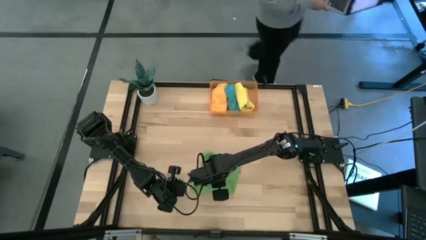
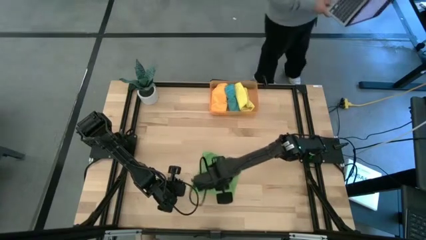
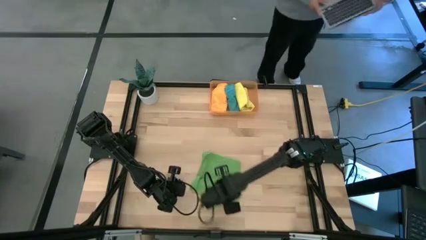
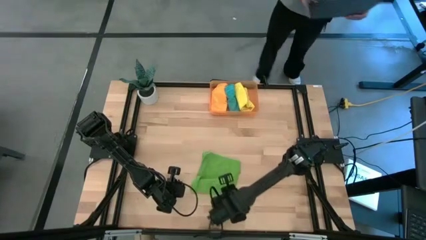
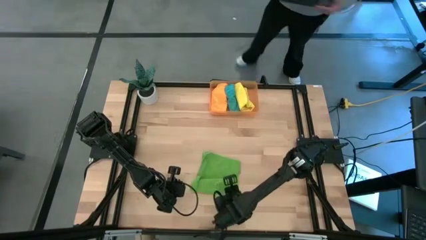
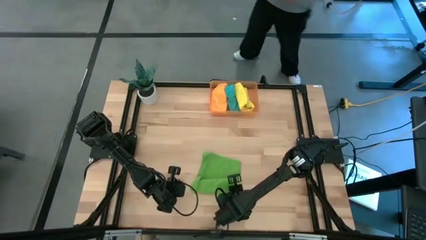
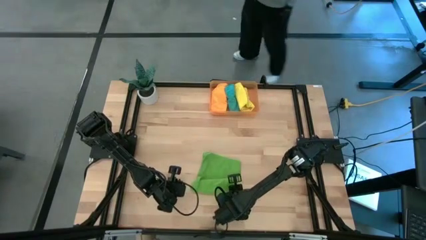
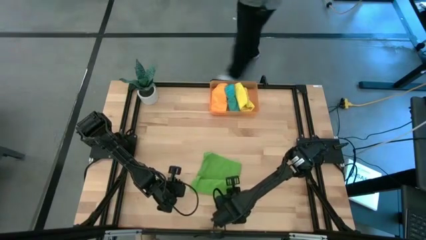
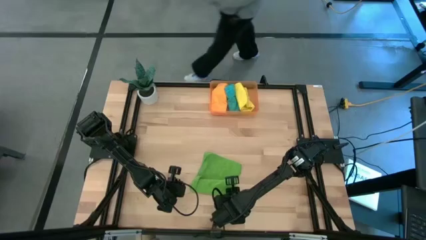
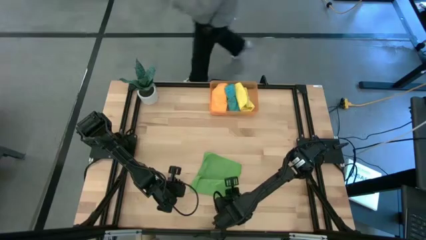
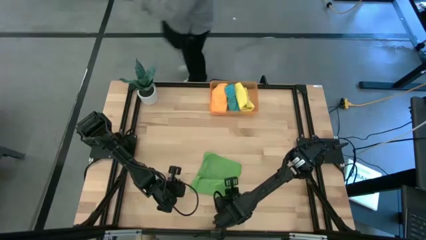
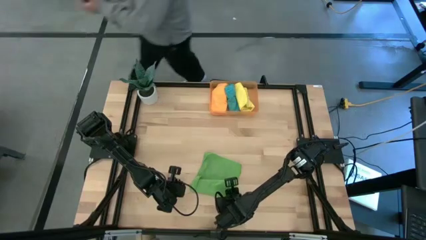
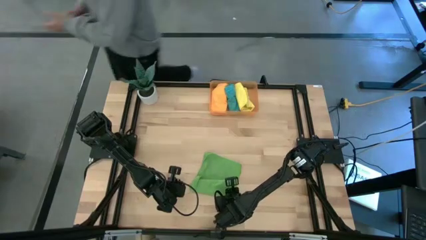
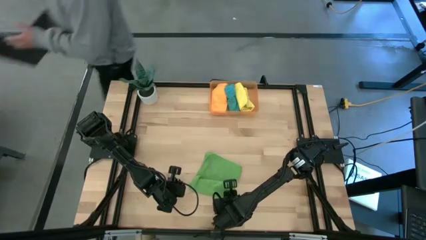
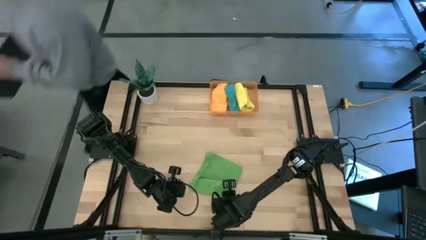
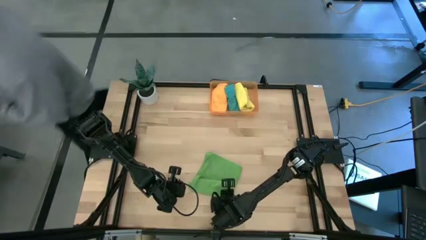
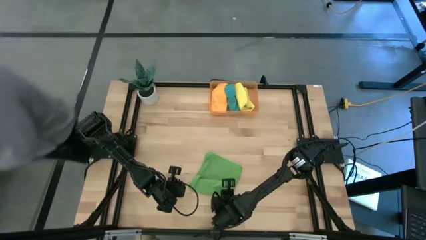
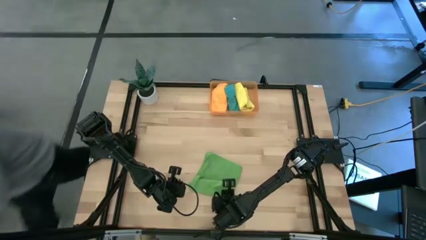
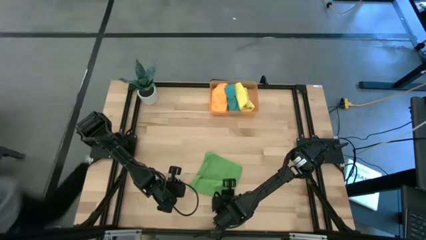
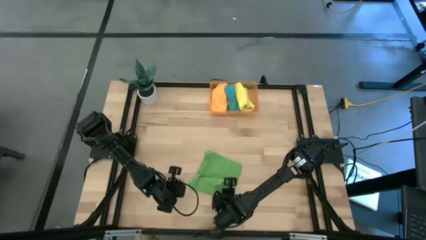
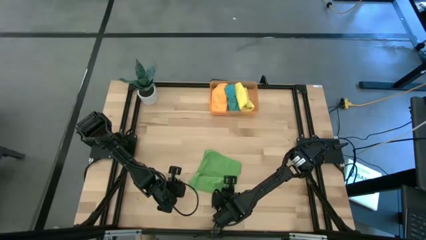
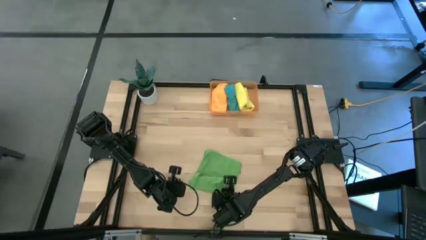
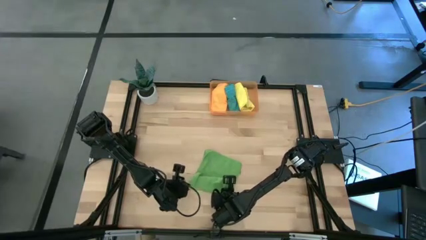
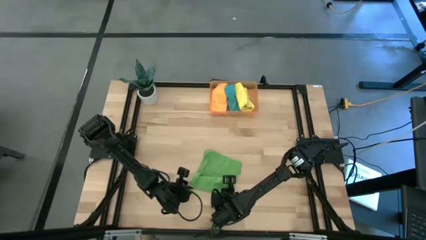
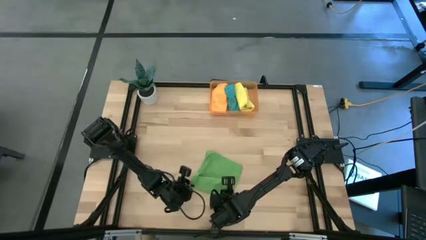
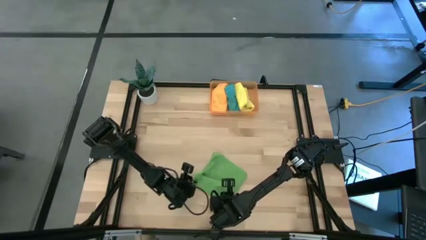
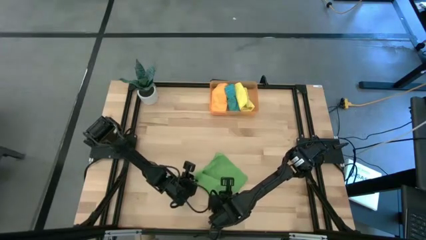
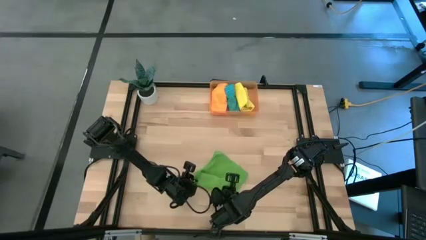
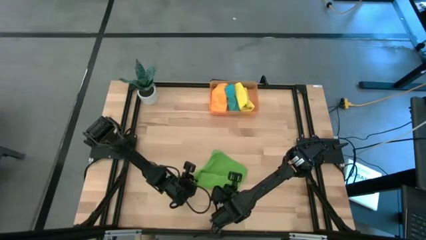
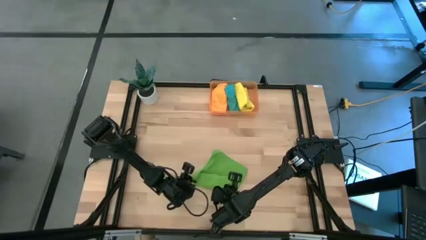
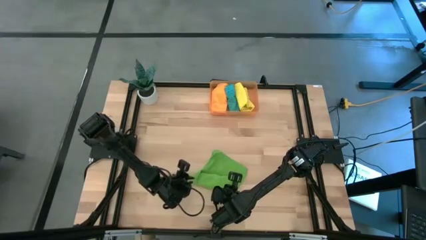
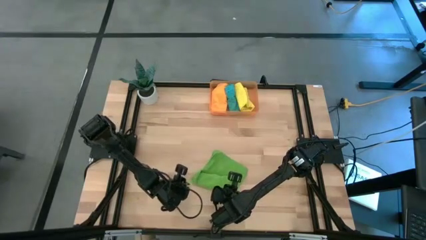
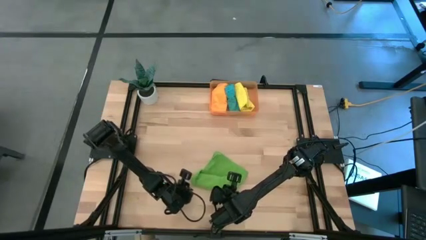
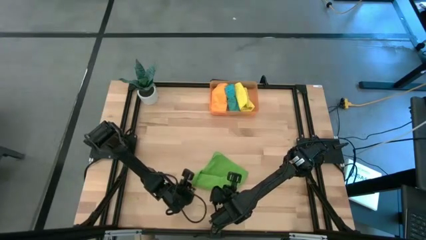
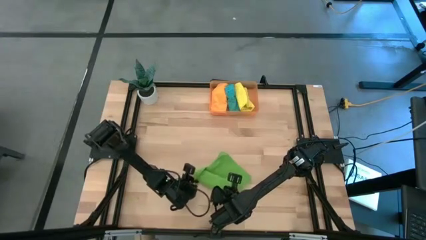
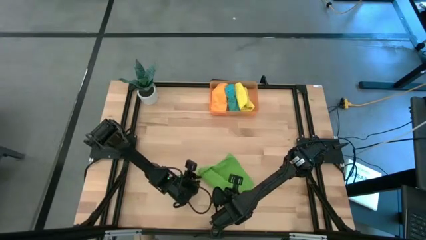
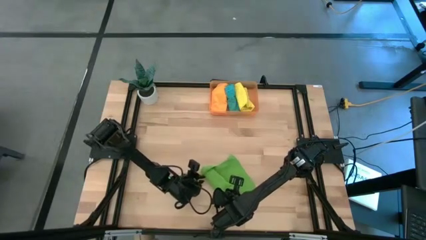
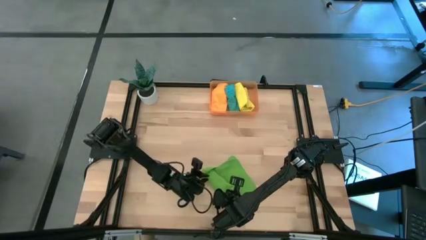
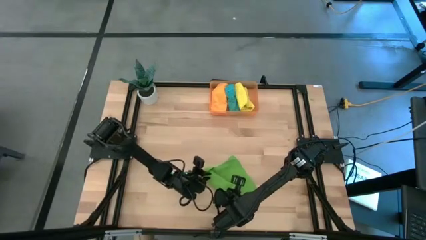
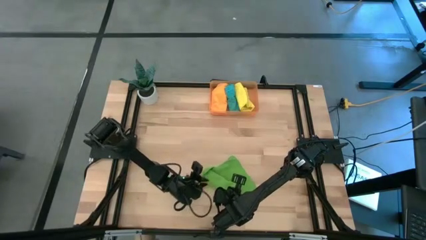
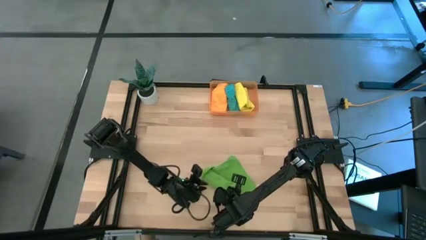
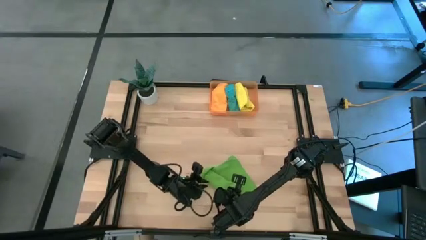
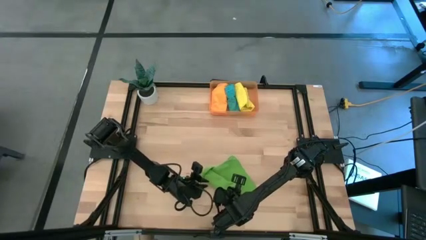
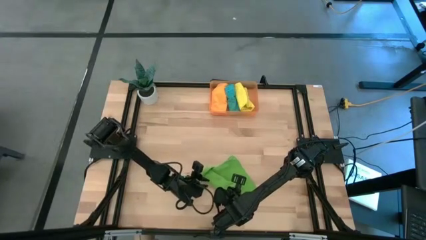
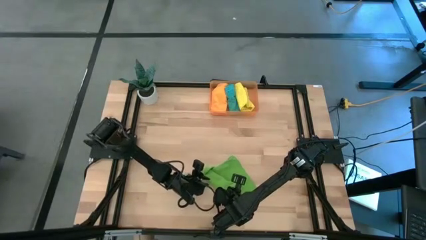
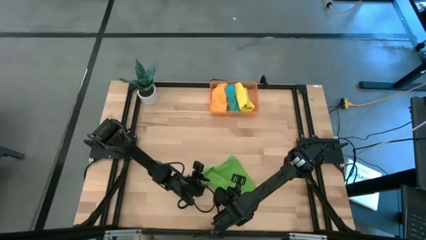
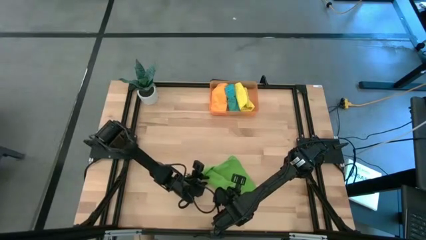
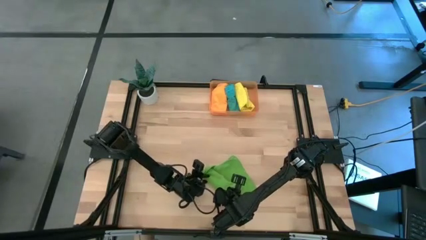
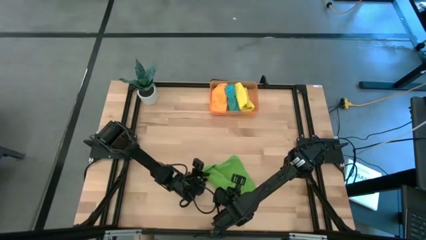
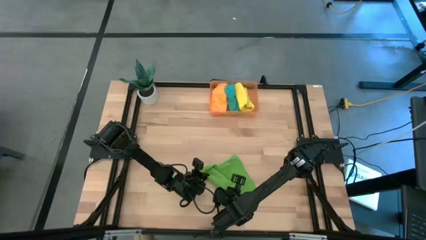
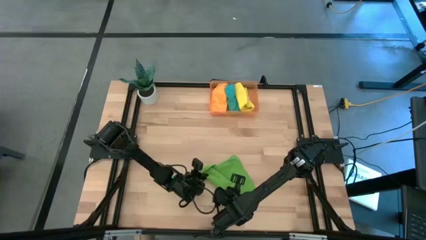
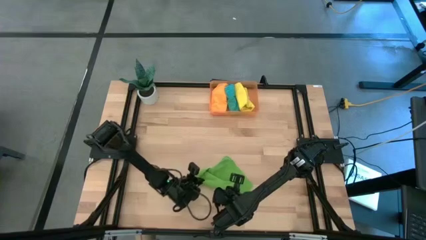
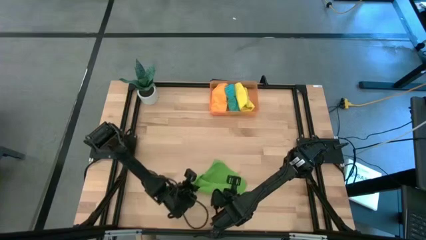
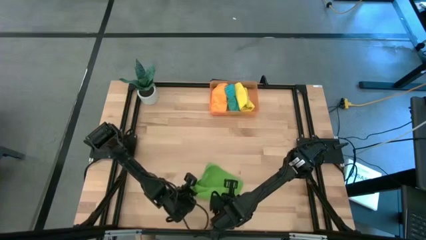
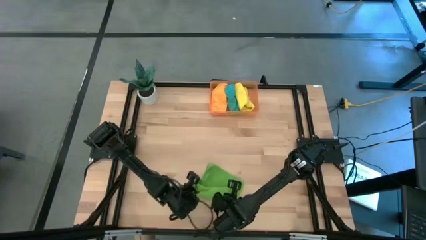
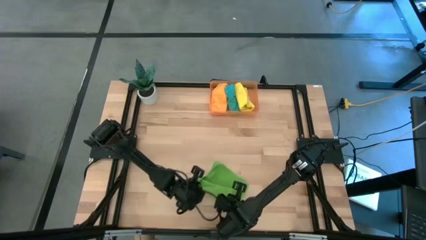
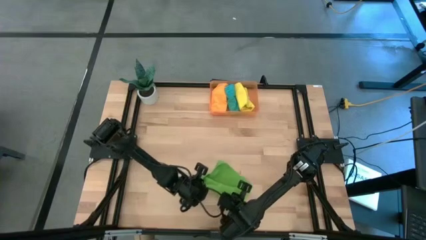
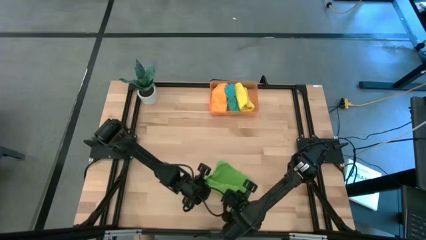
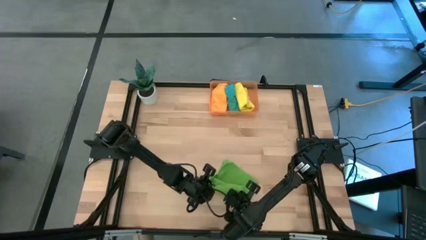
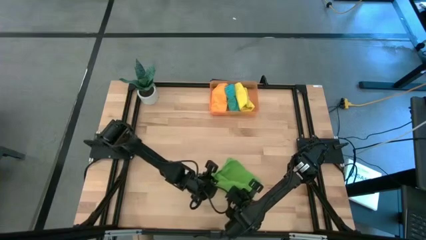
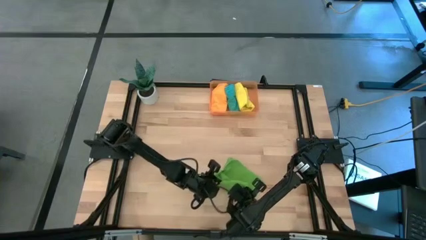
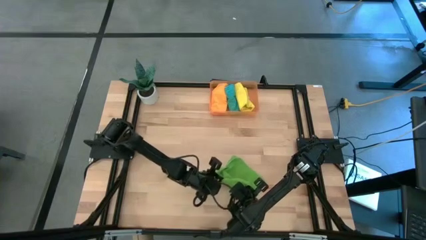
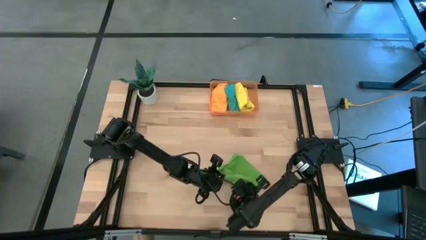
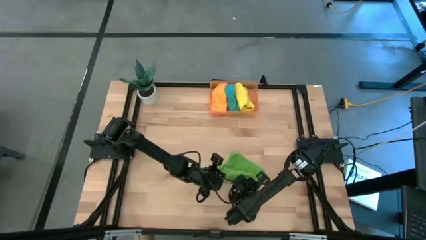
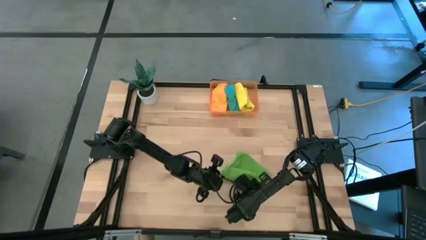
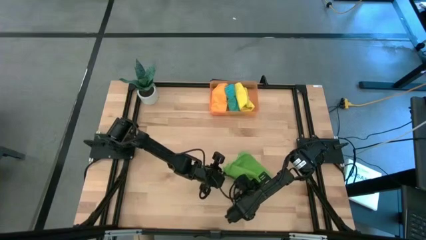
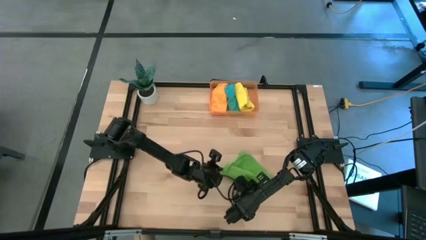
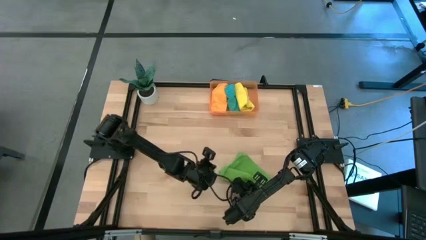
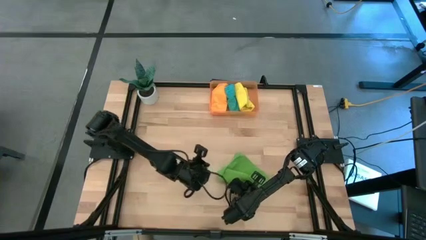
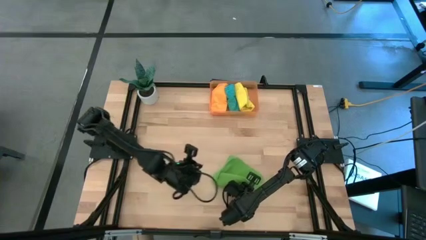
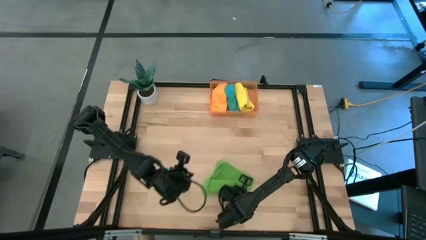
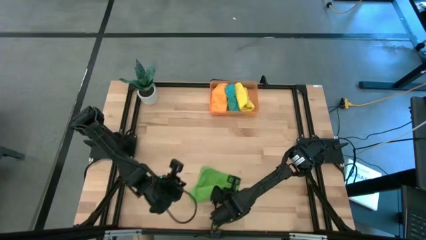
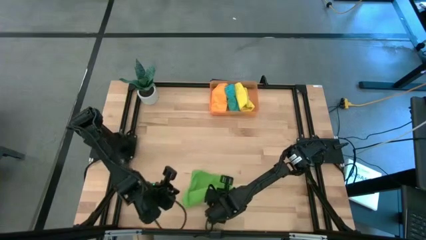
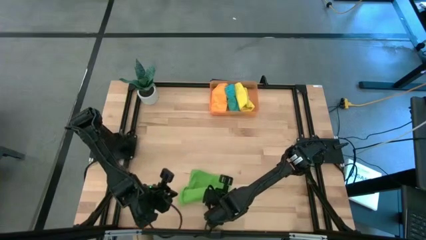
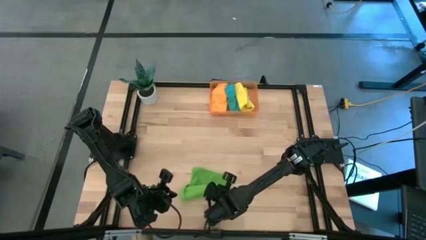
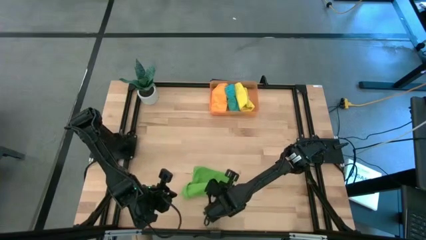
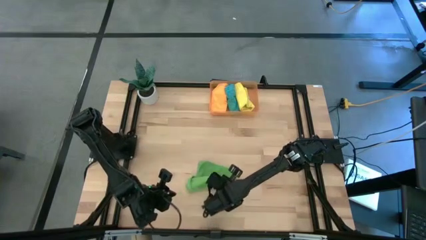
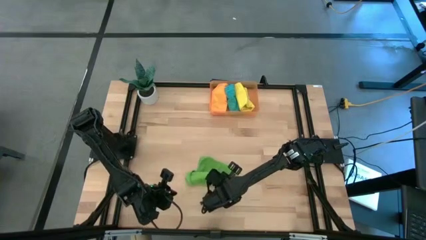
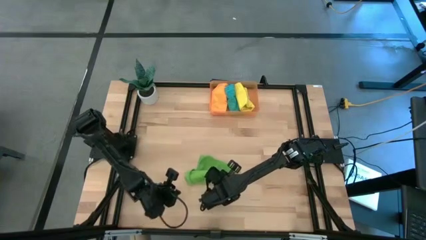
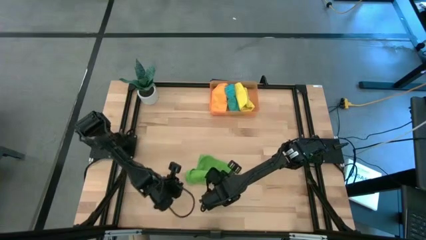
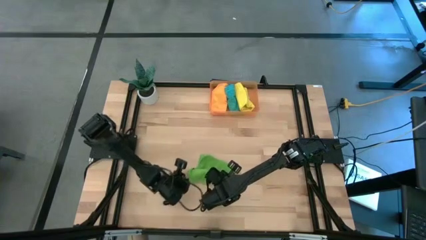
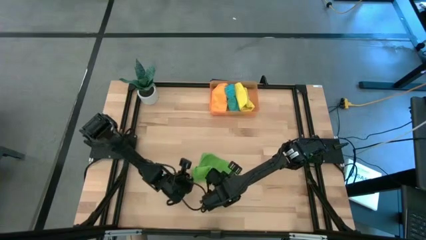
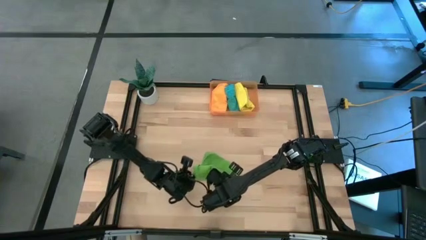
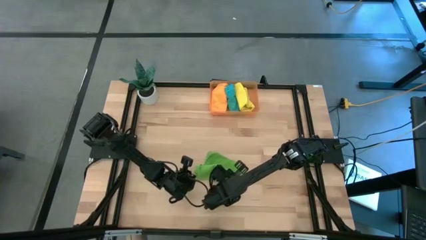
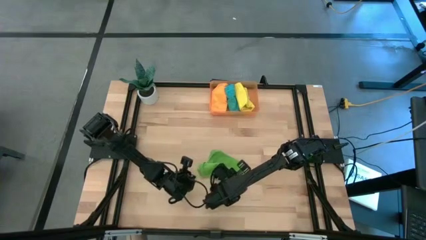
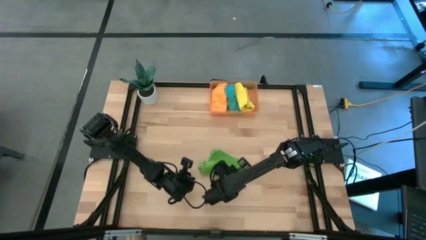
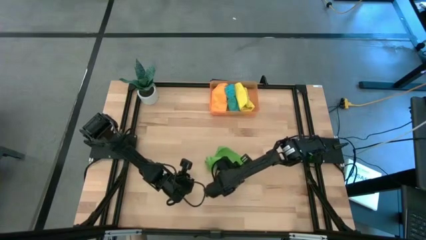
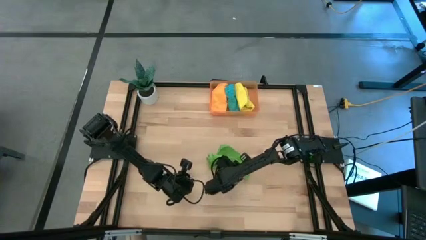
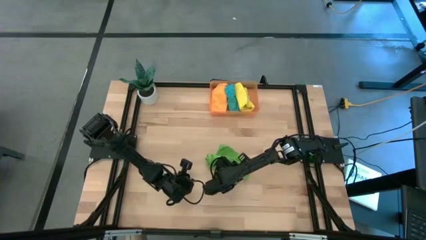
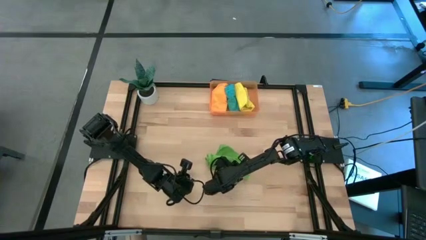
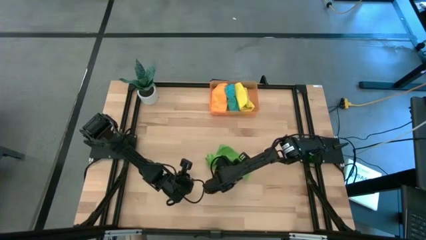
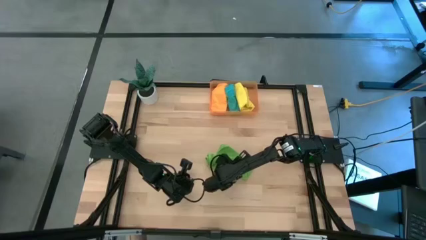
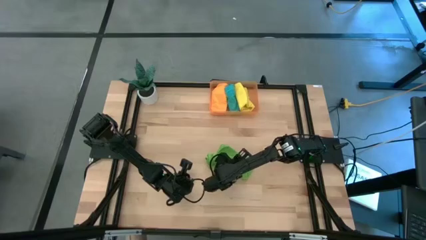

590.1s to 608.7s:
Task: Roll microfiber towels into tight, uniform cylinder then place into a basket
Roll the green microfiber towel
